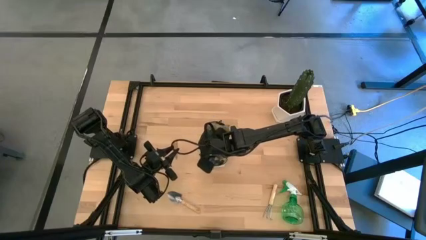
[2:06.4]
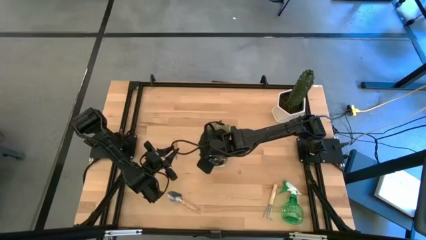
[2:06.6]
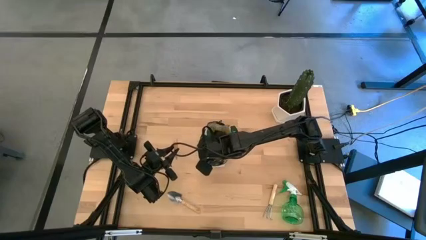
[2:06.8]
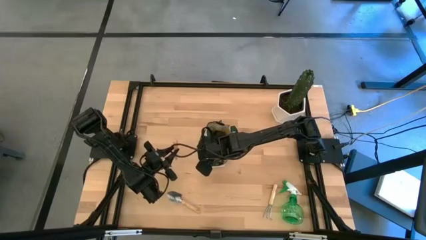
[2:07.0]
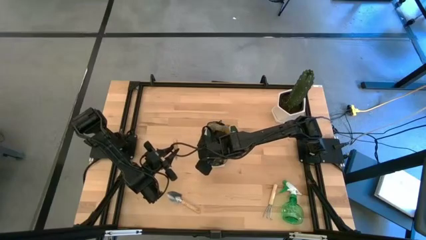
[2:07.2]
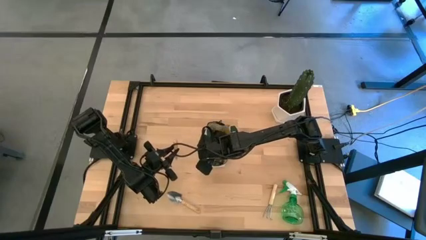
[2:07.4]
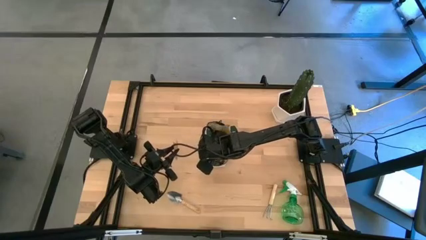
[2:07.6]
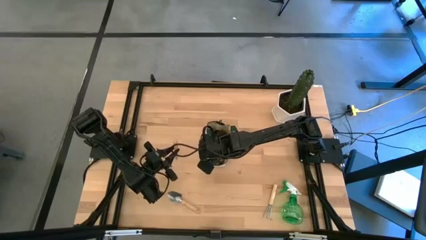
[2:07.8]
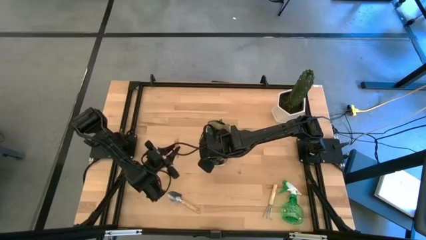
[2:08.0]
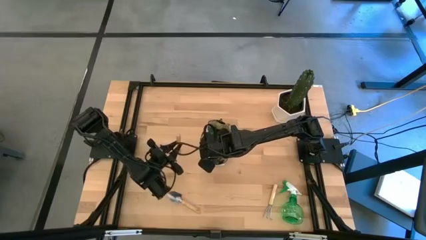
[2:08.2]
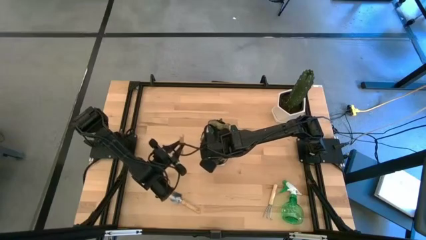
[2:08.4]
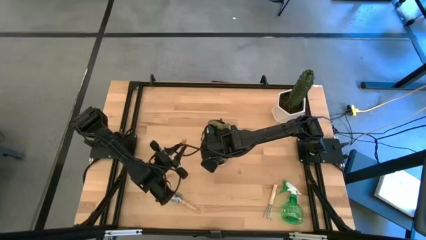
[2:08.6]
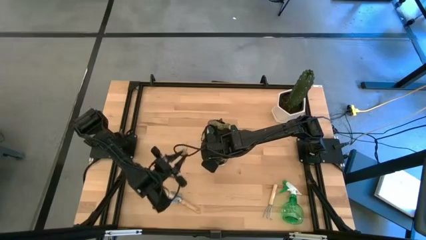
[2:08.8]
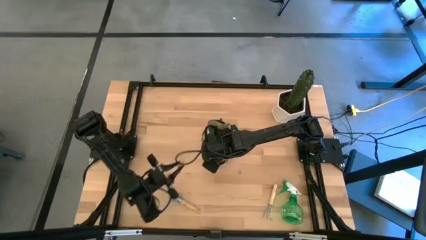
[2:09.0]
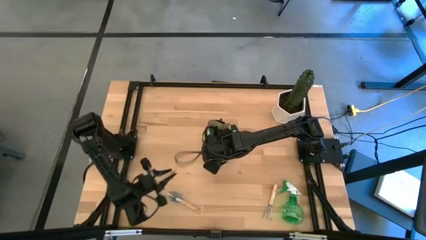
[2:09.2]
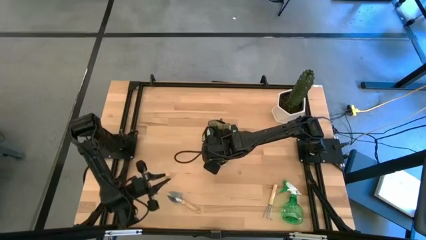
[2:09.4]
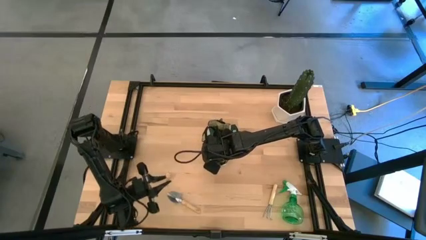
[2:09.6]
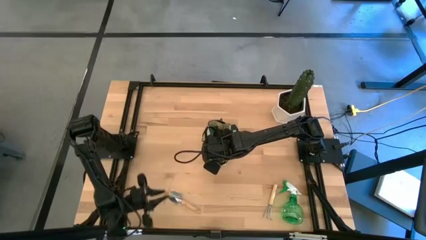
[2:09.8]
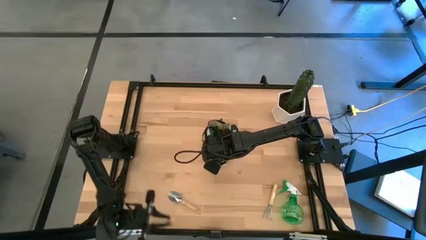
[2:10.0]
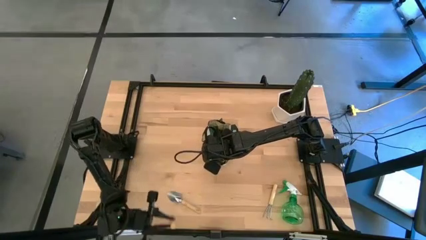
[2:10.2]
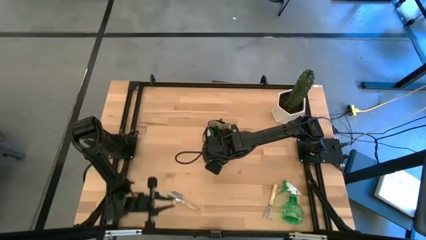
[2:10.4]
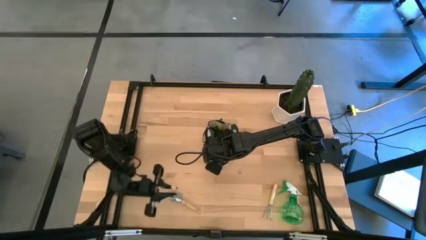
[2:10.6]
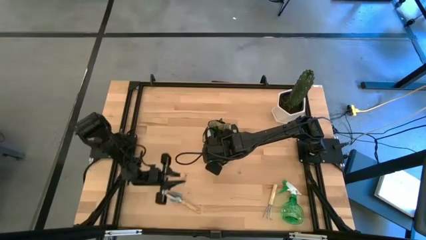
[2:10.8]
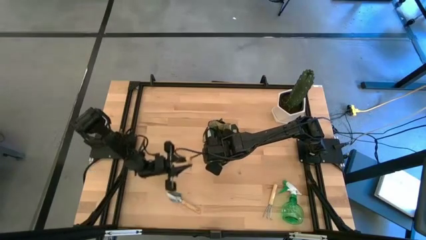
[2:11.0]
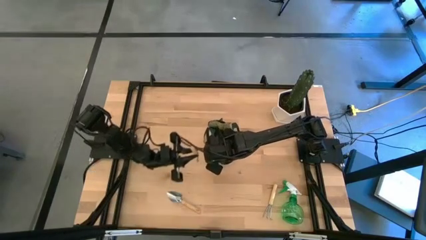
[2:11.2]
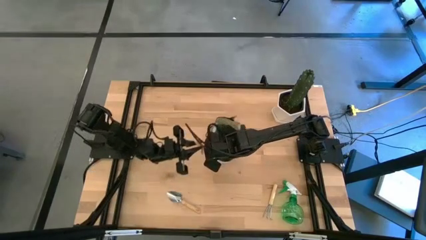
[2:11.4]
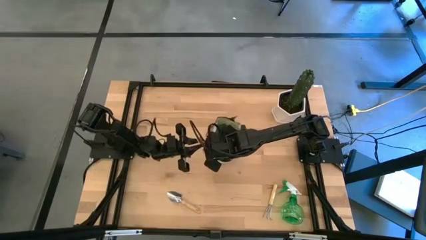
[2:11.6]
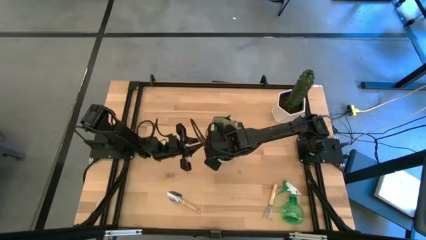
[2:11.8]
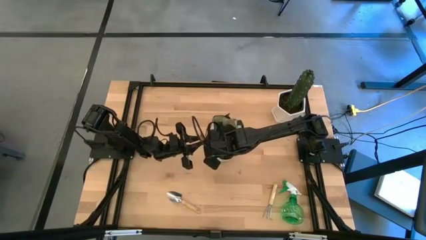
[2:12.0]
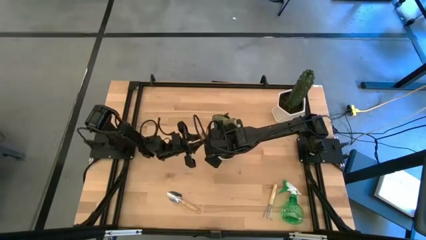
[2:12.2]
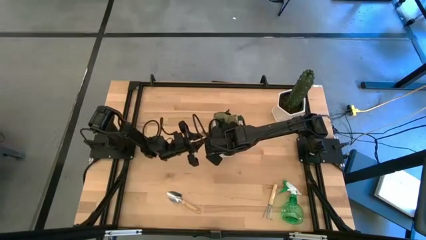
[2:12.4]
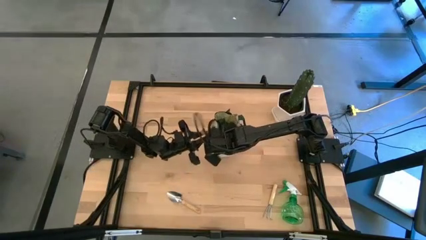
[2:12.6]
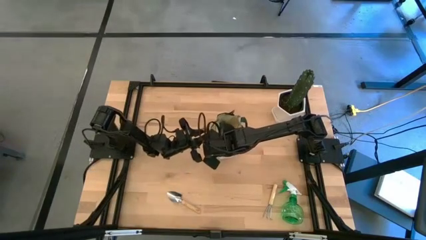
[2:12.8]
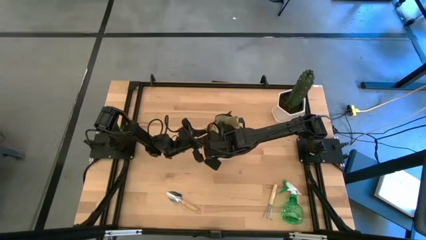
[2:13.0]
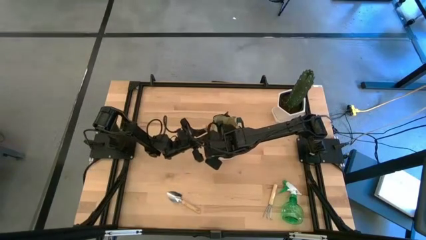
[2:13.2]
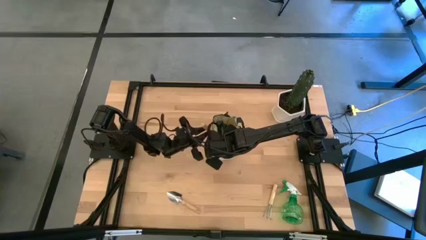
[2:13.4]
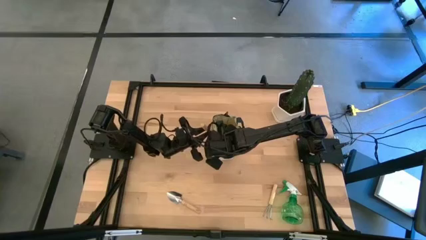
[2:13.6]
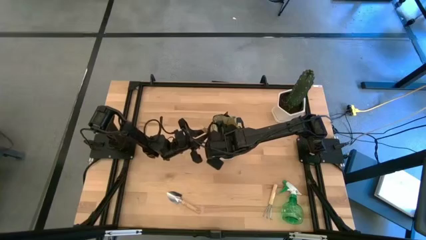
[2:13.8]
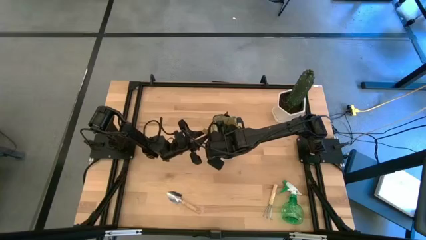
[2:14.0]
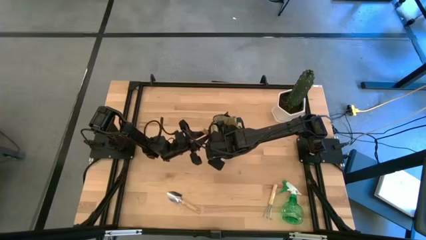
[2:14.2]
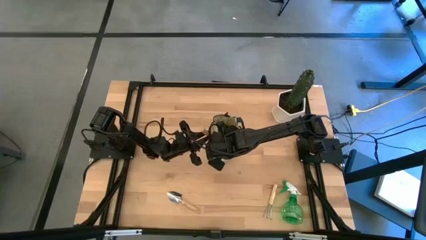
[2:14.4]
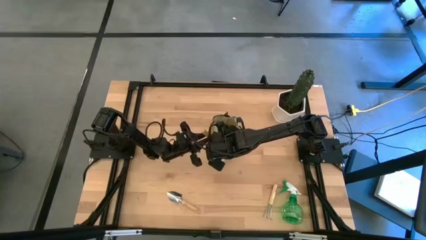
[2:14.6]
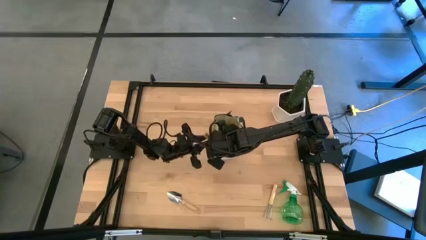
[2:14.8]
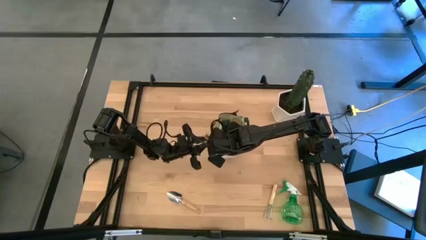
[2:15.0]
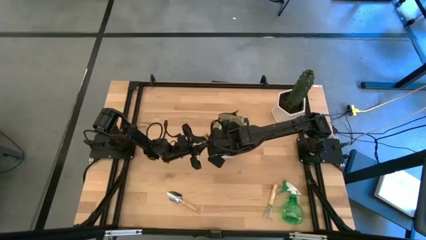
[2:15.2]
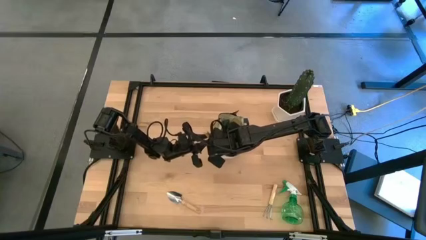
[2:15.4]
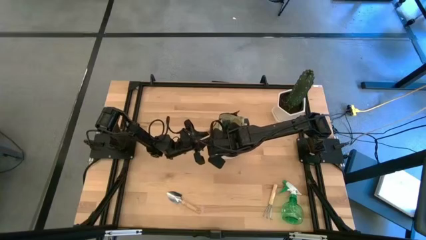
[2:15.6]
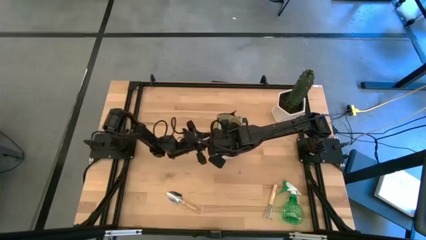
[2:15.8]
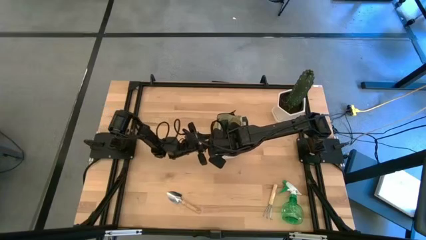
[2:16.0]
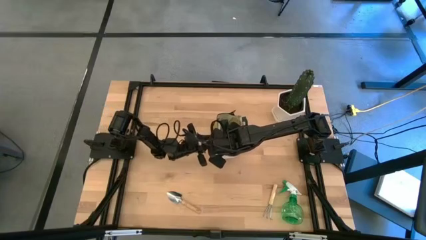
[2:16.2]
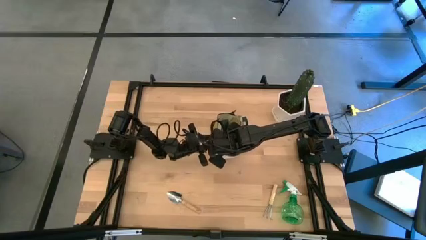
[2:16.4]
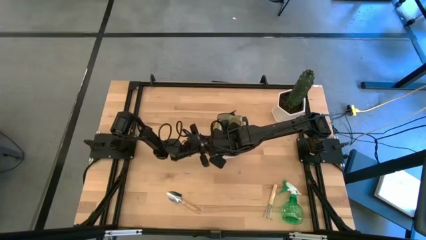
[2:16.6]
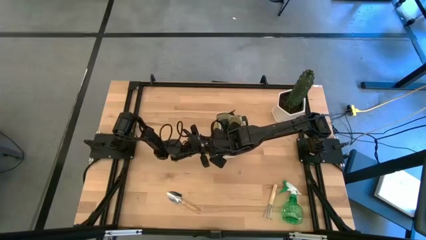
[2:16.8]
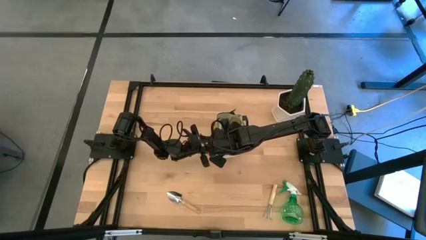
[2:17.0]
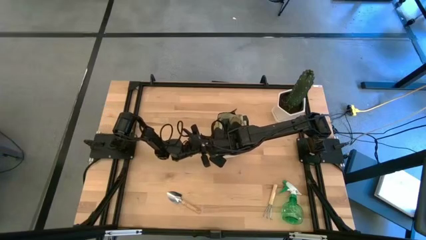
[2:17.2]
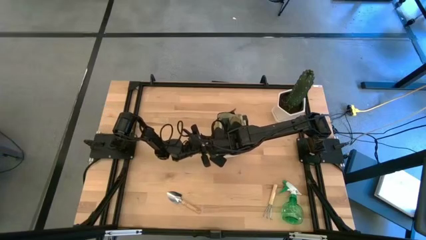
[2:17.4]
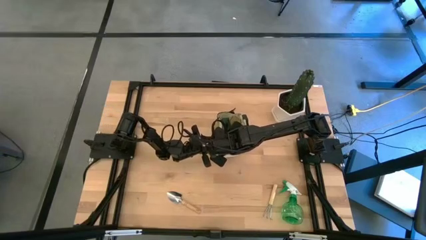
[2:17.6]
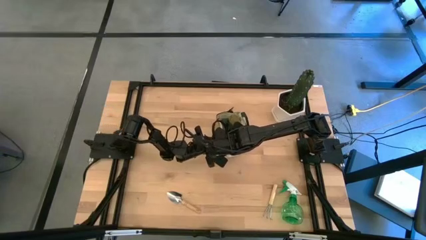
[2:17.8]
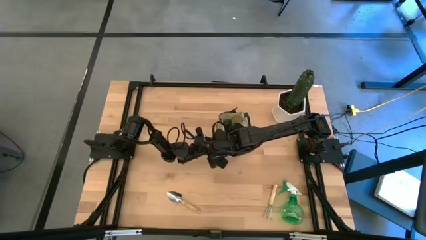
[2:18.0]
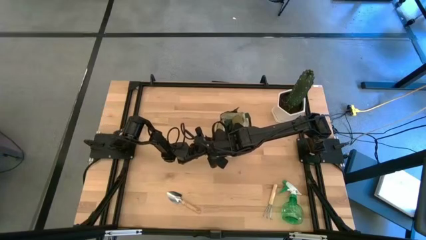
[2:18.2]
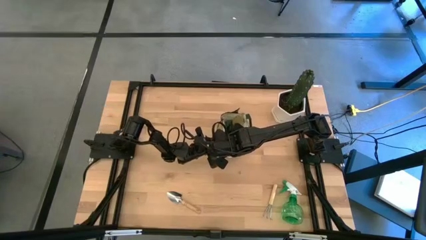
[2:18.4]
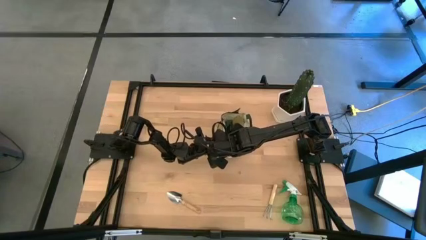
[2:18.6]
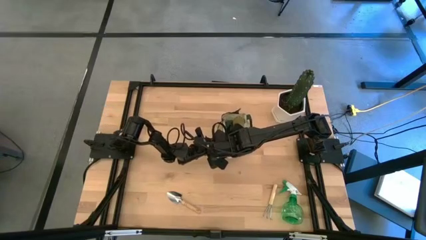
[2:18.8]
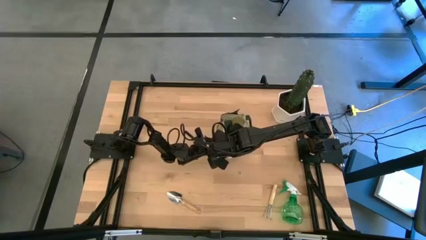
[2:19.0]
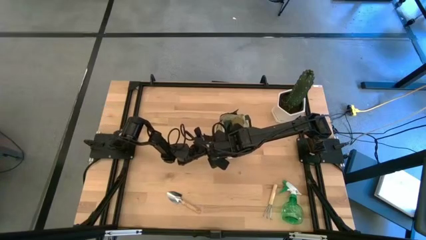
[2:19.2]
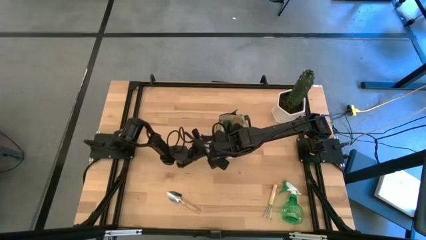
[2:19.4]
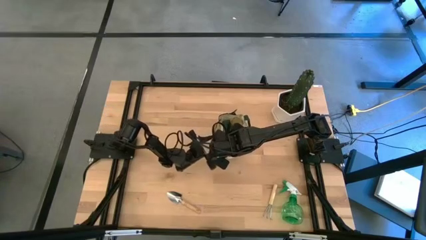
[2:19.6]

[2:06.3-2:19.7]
Task: Pick & Place Garden tools in Gardening bag
Put the top brown trowel into the green gardening bag

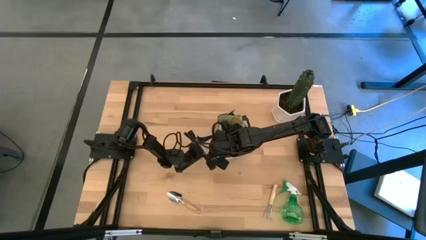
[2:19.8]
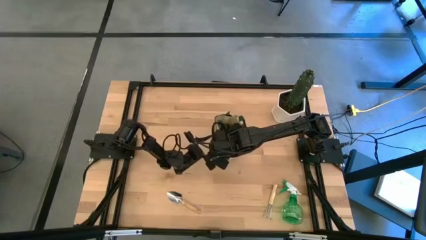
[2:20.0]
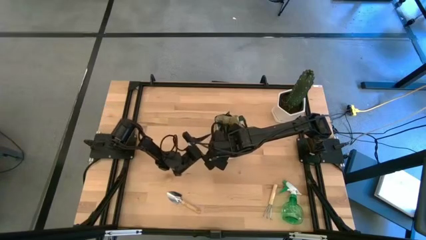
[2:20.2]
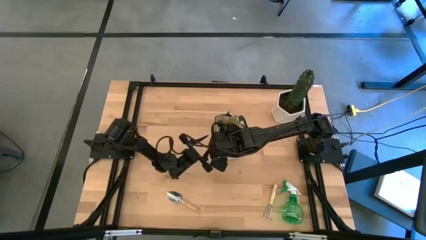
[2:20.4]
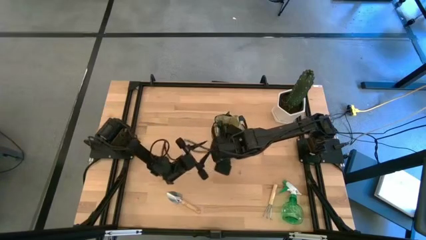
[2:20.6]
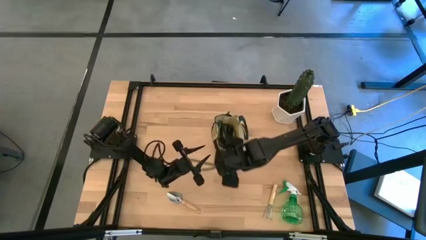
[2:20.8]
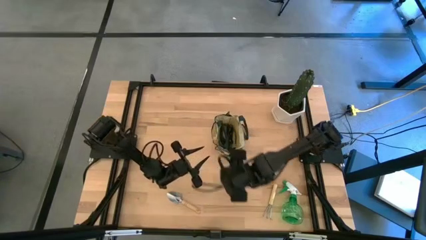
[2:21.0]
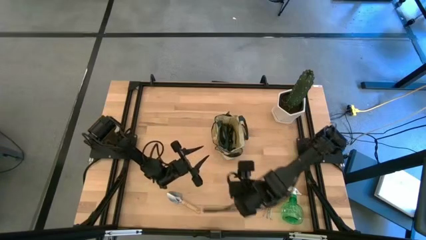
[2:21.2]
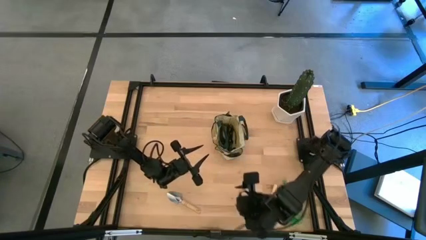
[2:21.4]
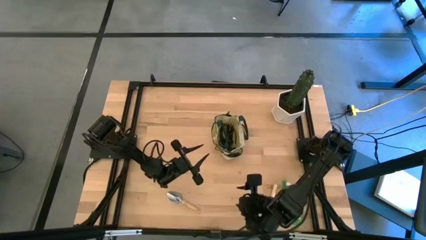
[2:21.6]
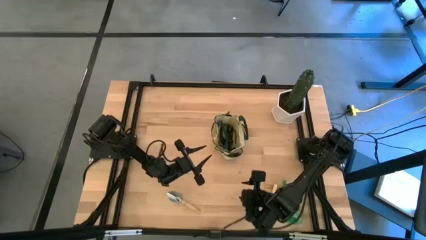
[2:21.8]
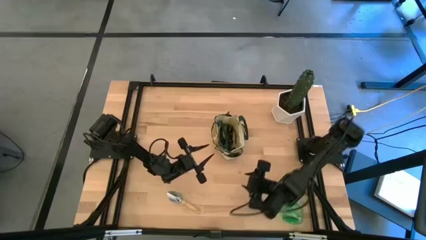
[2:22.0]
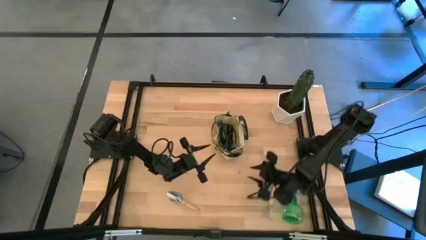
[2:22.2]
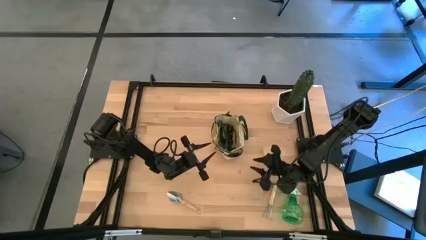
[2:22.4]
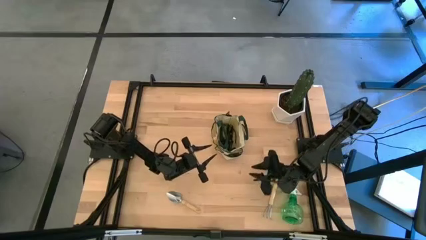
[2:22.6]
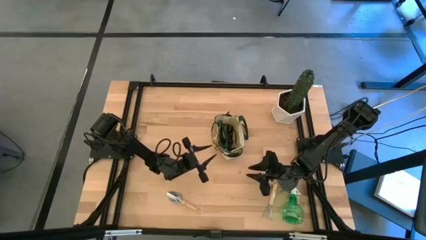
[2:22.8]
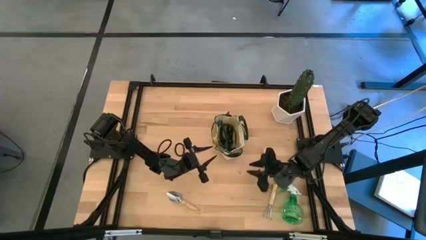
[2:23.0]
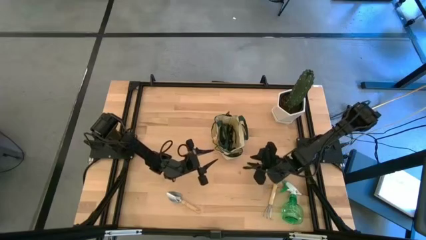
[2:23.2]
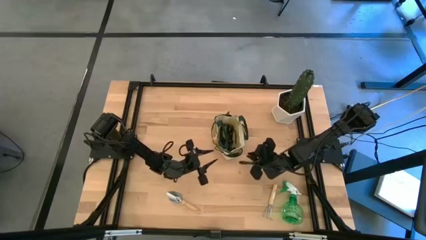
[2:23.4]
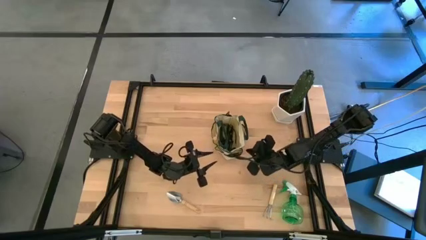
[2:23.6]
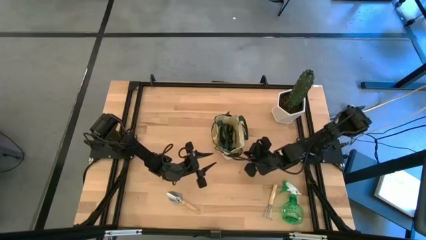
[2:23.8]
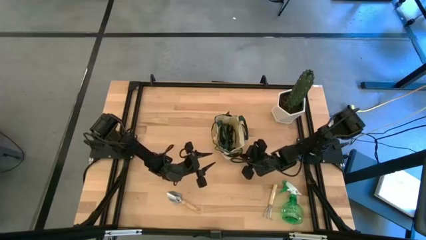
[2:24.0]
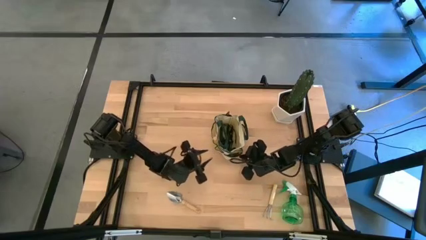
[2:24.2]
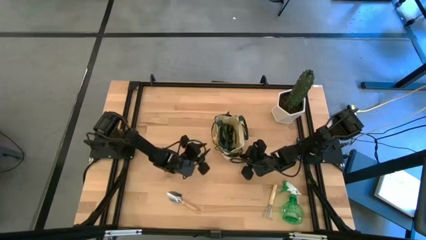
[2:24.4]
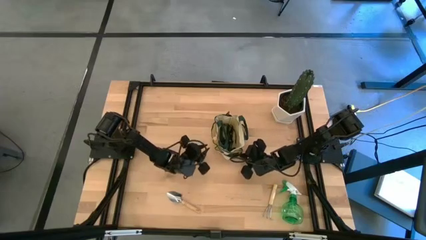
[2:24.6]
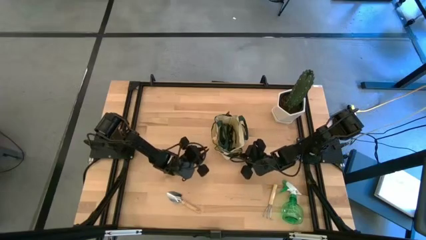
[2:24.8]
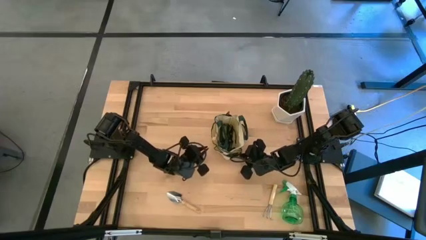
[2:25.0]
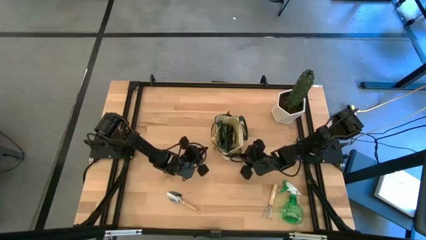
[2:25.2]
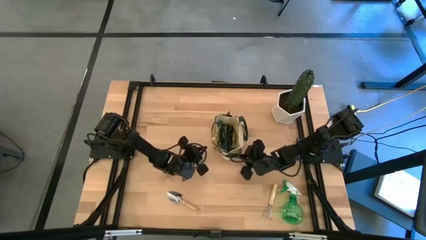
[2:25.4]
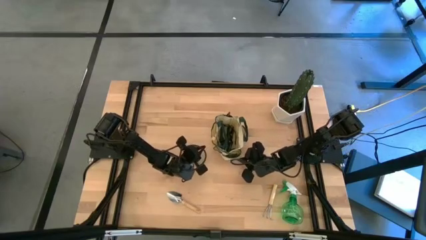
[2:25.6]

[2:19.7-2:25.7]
Adjust the green gardening bag
